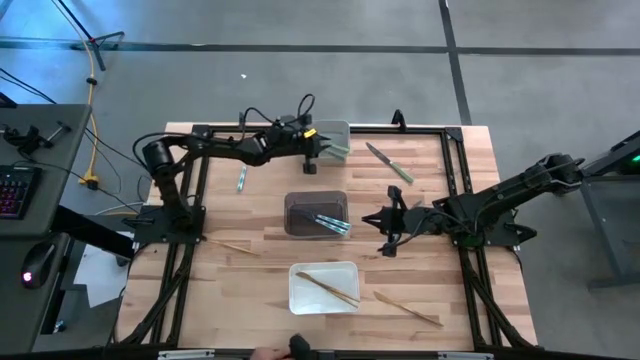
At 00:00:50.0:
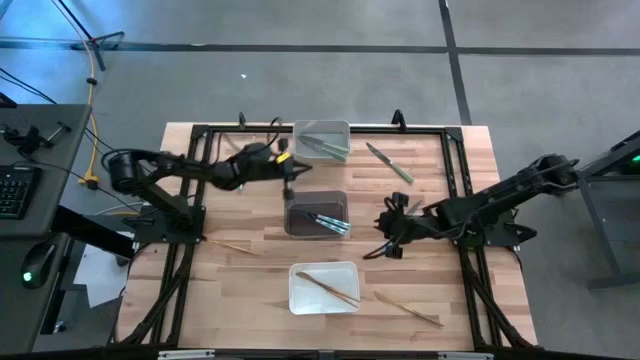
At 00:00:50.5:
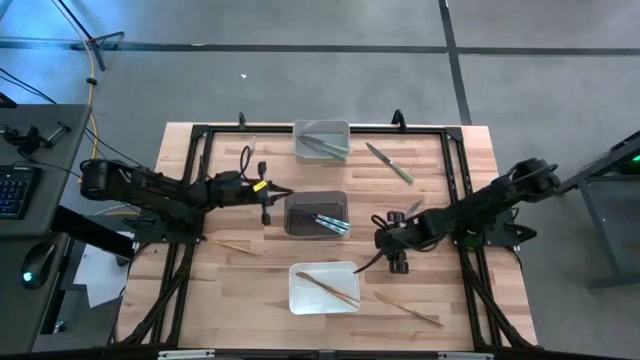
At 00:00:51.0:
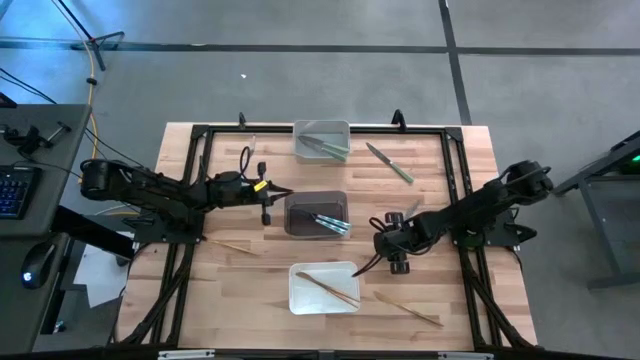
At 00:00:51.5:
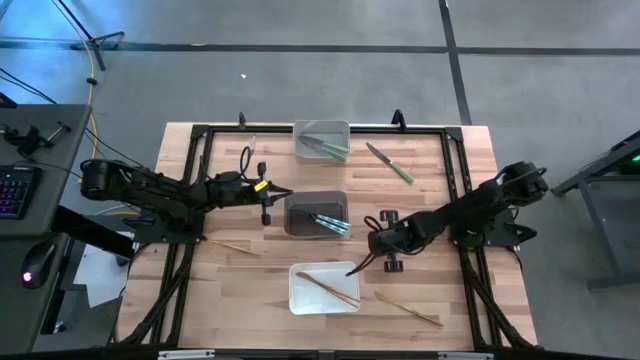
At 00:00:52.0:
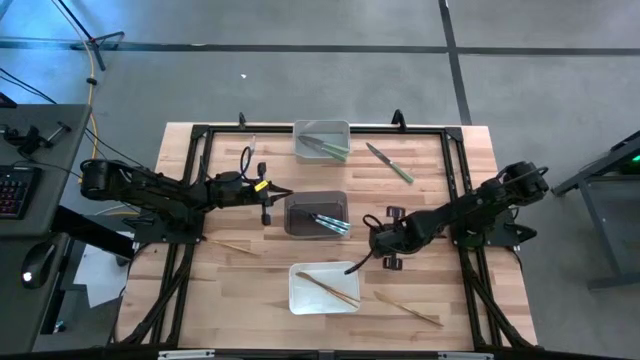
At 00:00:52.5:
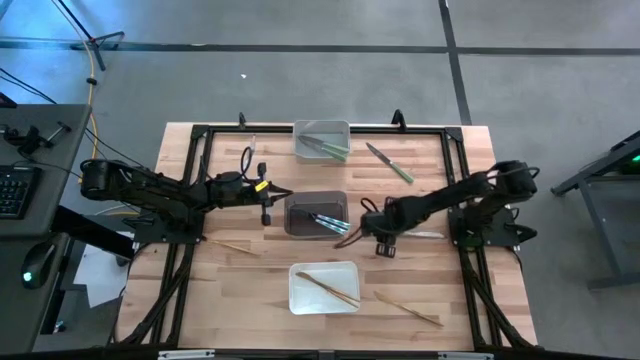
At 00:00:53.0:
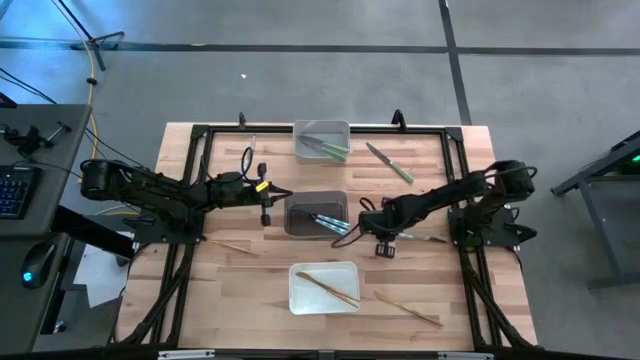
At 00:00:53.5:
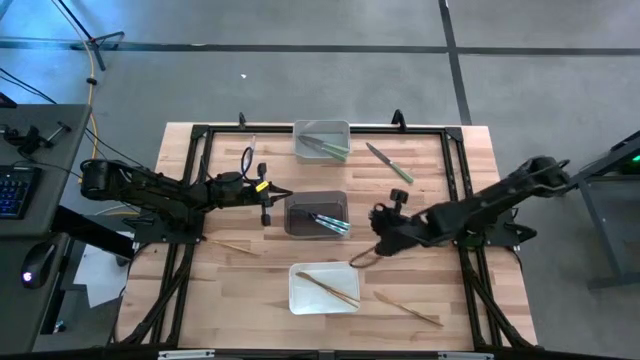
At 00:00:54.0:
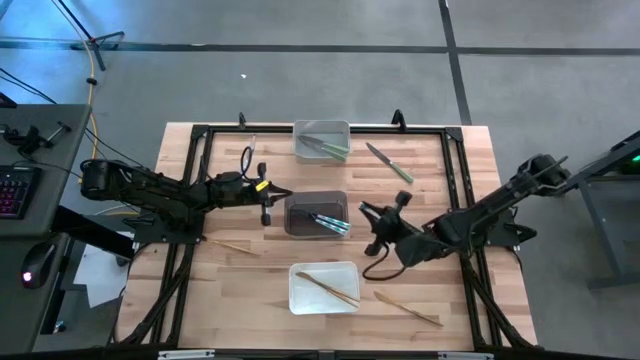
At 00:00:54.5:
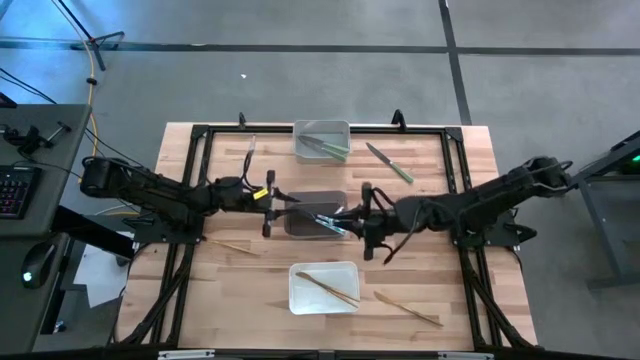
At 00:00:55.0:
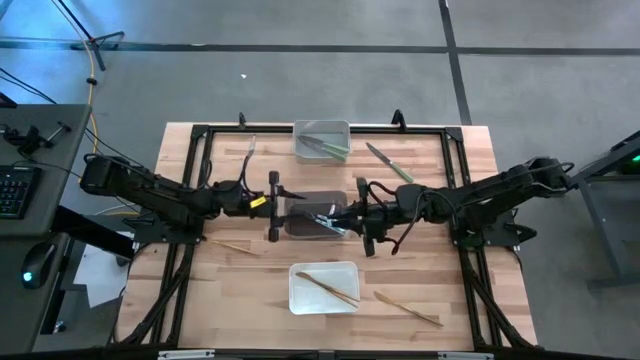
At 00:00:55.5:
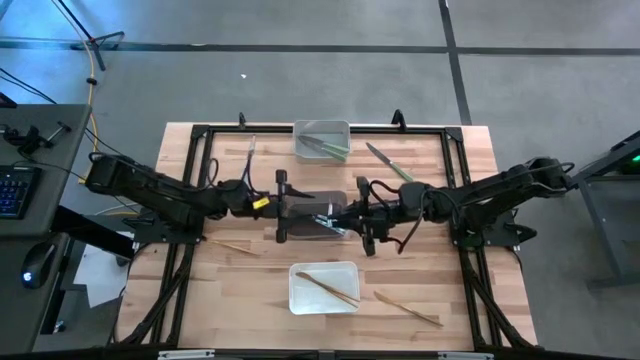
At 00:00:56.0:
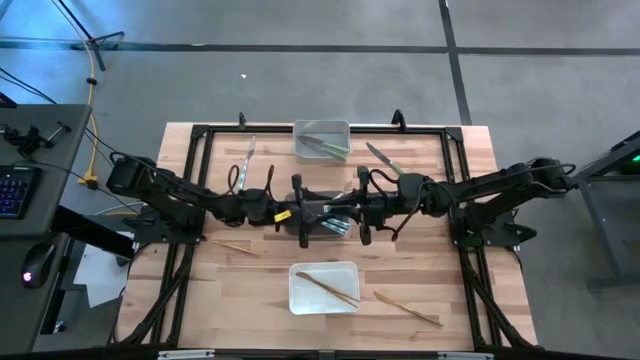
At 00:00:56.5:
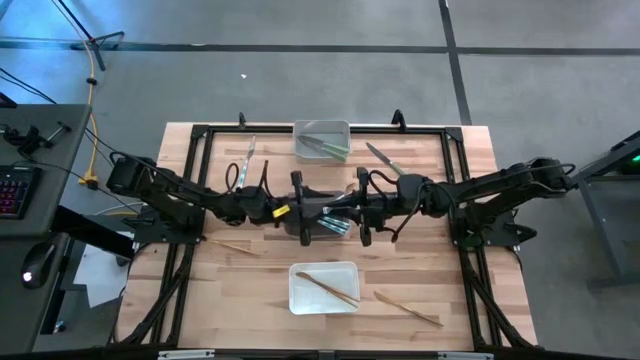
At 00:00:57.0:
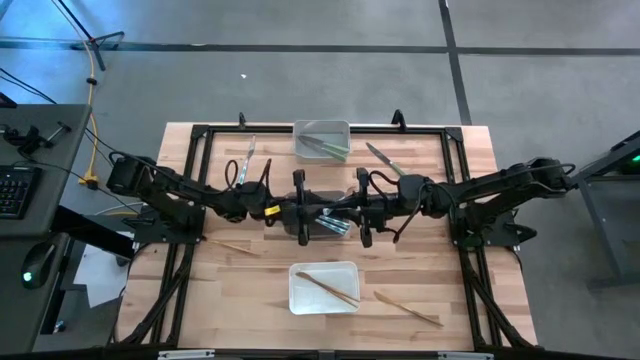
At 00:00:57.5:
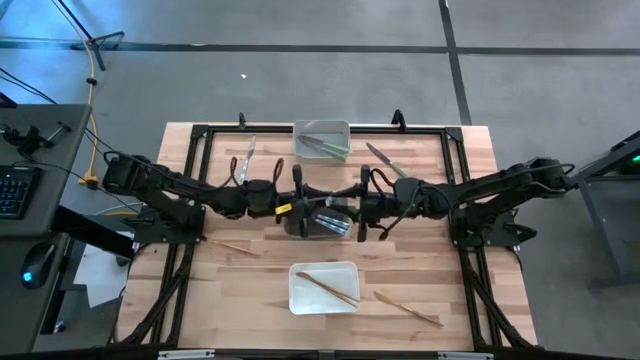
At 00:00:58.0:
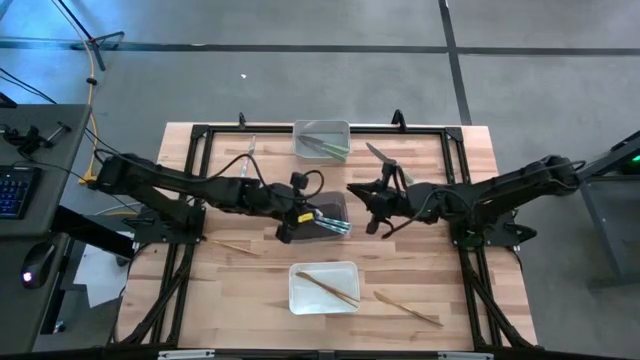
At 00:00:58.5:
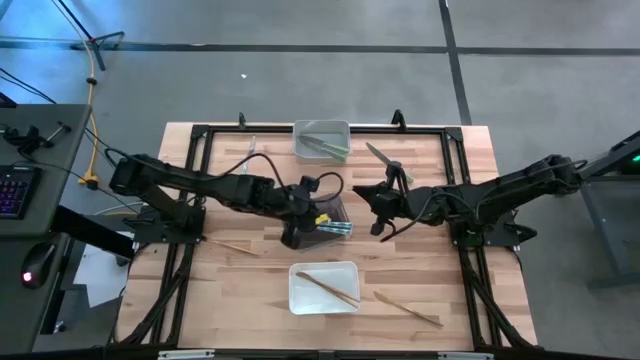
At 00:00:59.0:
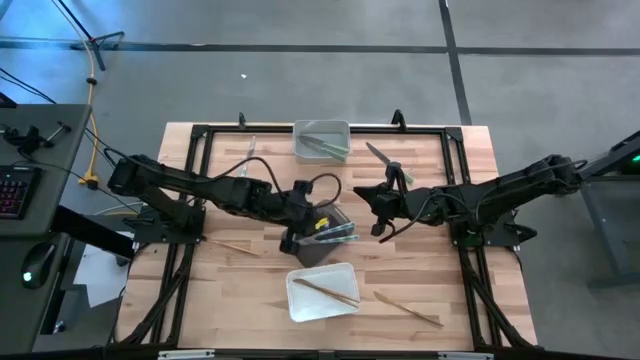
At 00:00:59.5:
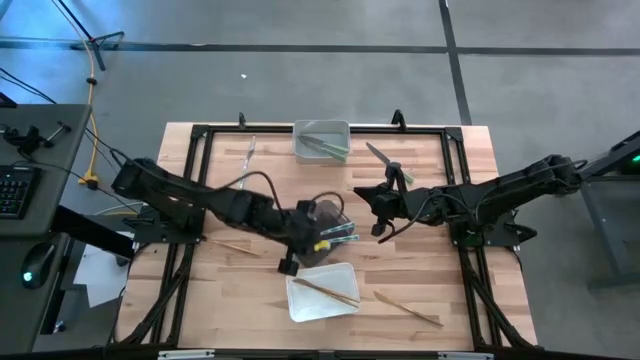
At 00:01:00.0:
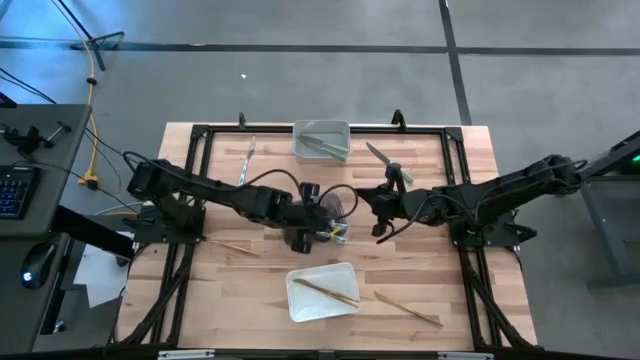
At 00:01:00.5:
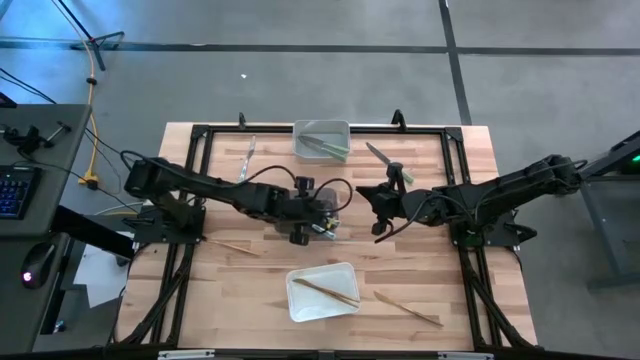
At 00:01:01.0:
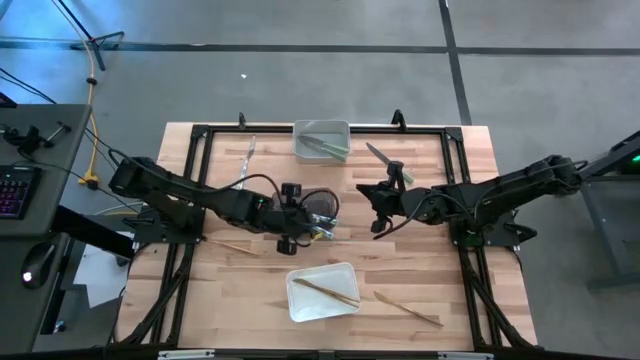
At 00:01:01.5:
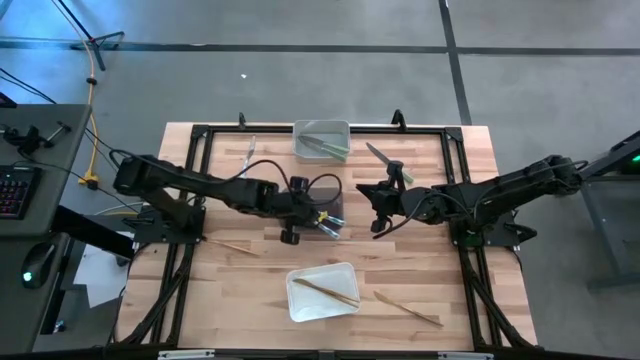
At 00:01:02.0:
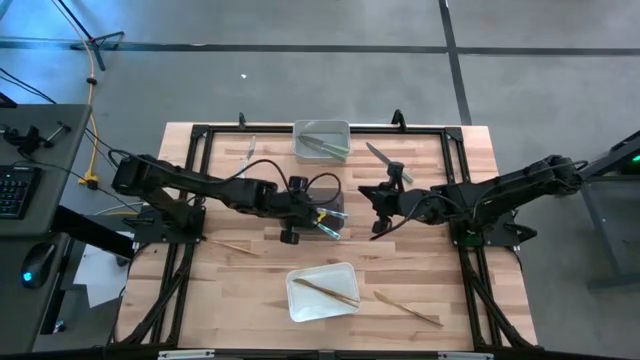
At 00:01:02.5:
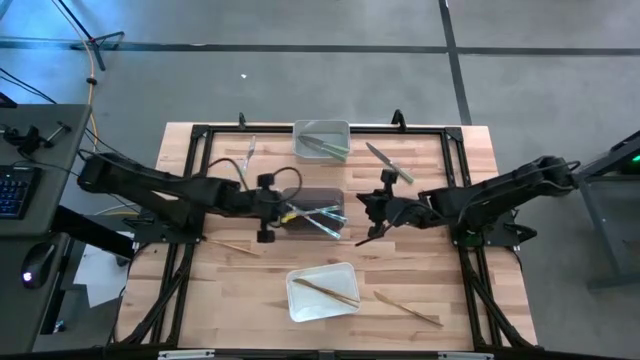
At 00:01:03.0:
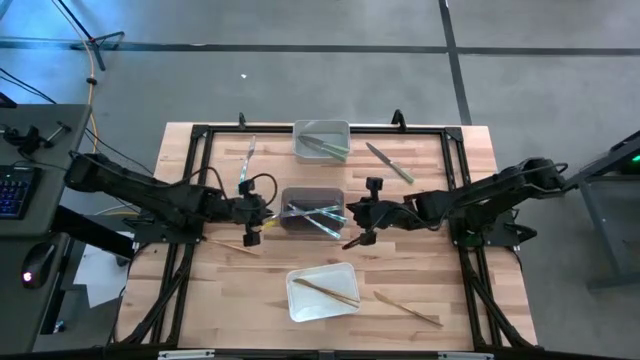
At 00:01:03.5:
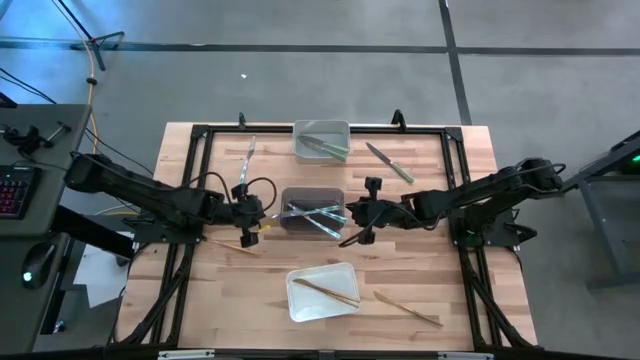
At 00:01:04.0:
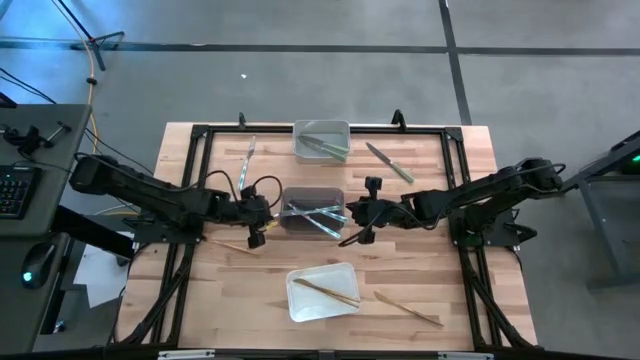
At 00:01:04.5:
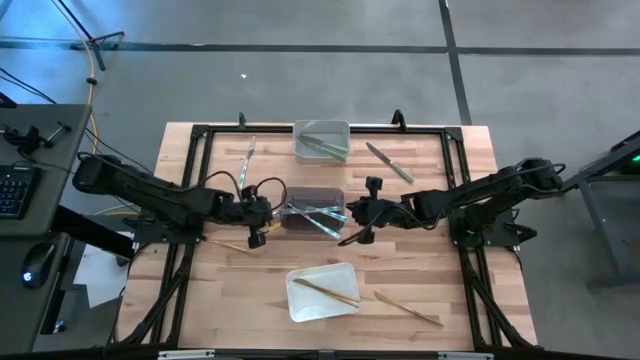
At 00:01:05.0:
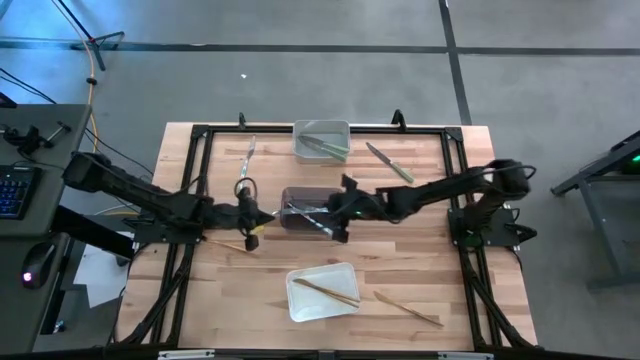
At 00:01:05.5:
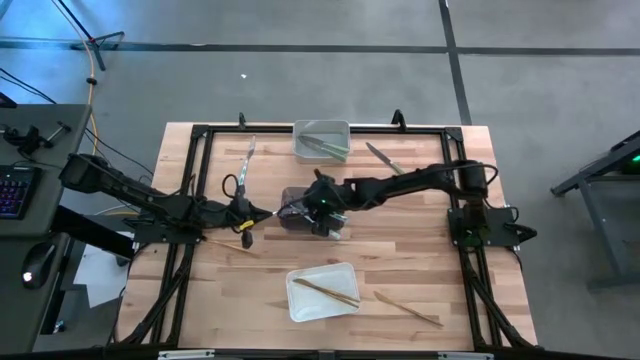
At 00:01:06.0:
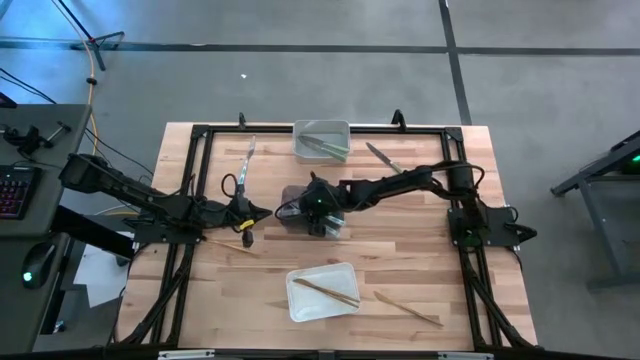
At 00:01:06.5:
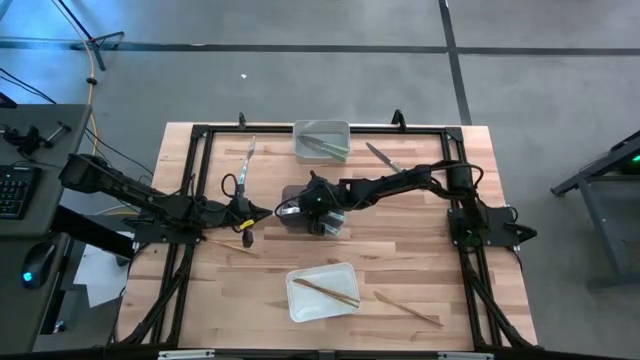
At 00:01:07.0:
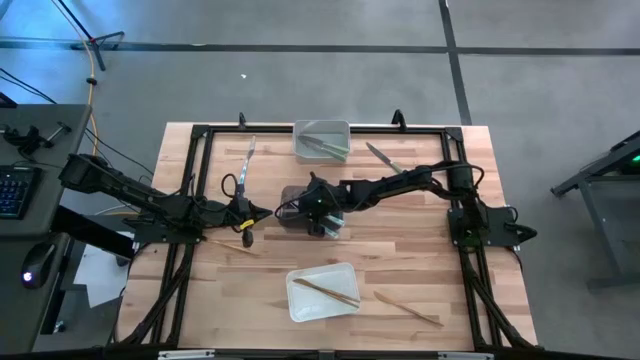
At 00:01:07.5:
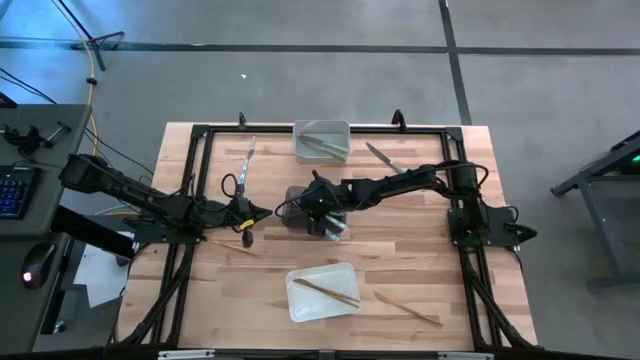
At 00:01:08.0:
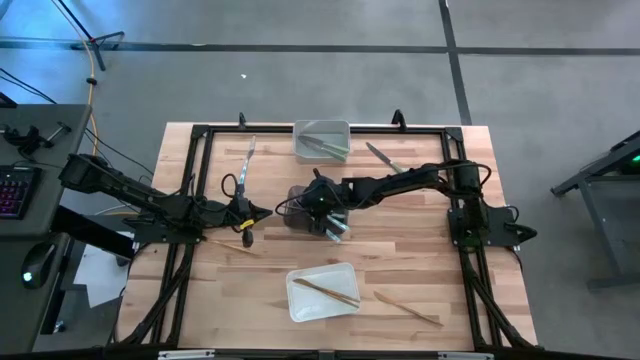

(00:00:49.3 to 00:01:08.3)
Task: Sort silverware by color (type)
Put the blue patterned table knife into the black bin
